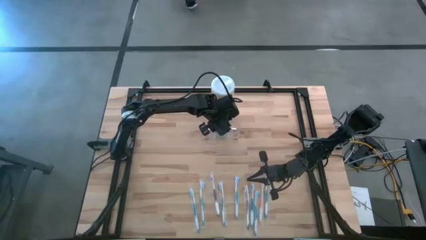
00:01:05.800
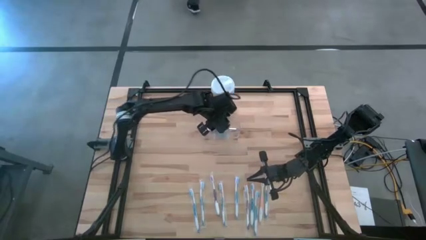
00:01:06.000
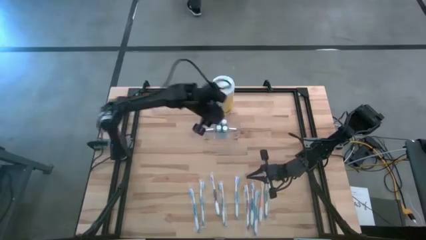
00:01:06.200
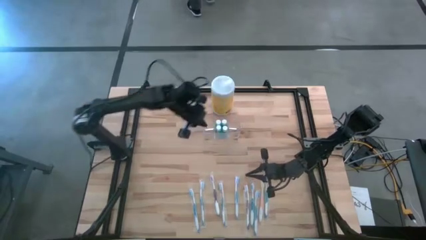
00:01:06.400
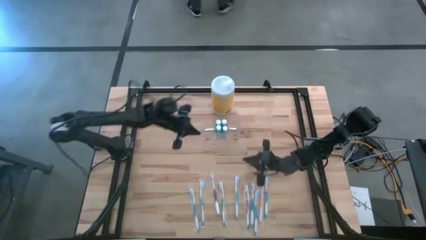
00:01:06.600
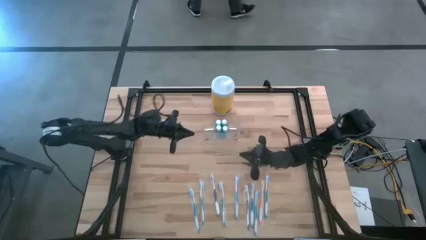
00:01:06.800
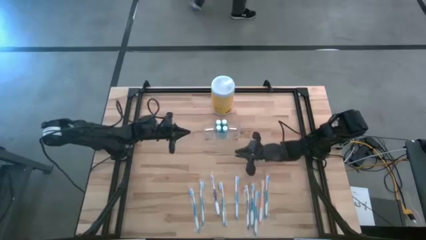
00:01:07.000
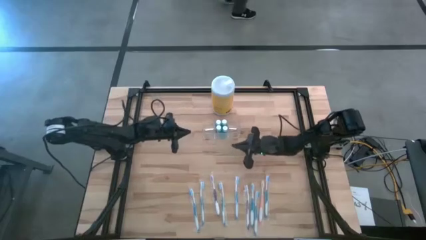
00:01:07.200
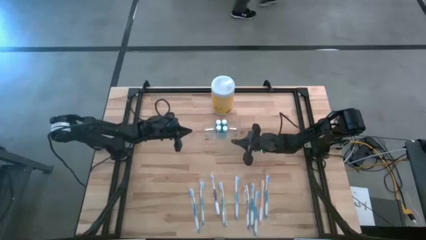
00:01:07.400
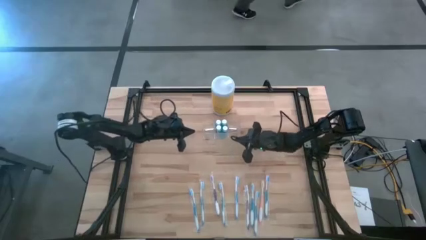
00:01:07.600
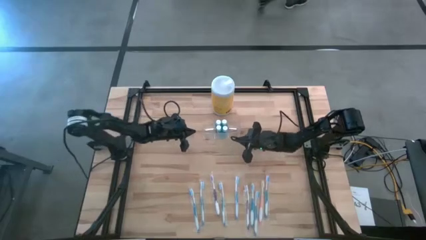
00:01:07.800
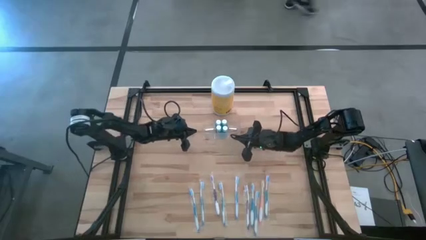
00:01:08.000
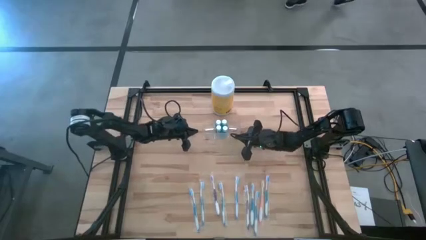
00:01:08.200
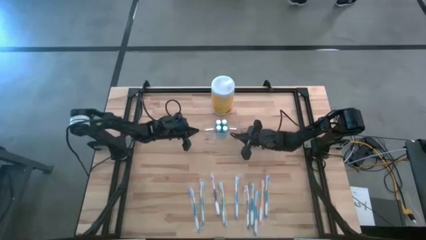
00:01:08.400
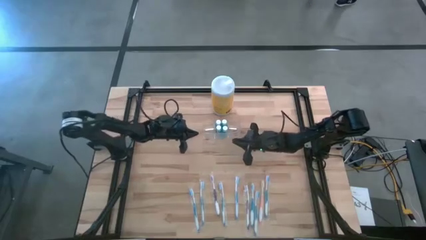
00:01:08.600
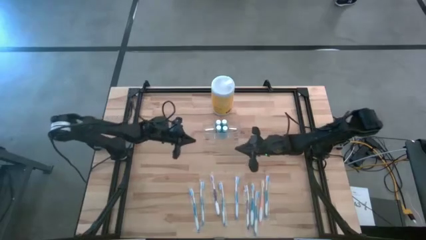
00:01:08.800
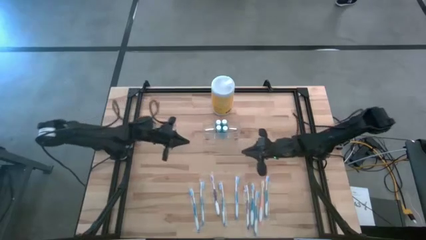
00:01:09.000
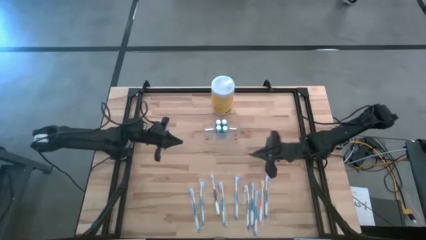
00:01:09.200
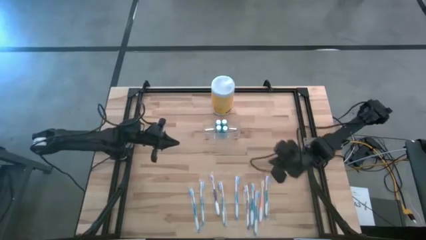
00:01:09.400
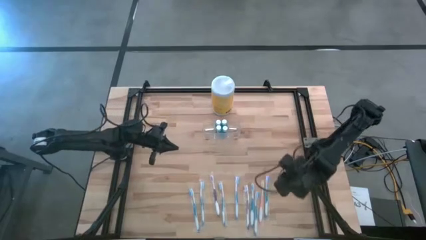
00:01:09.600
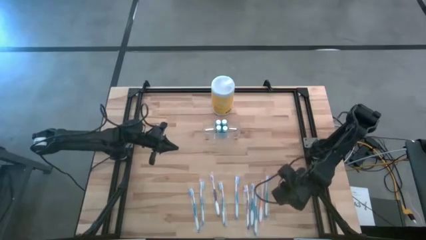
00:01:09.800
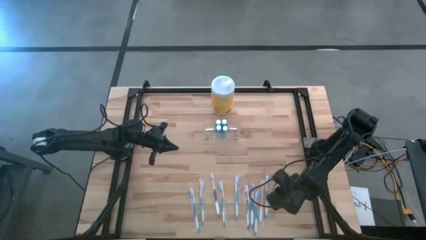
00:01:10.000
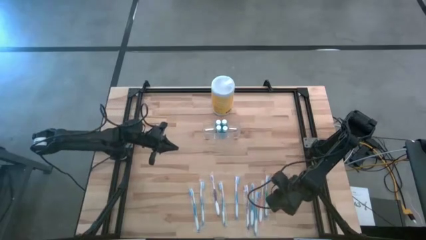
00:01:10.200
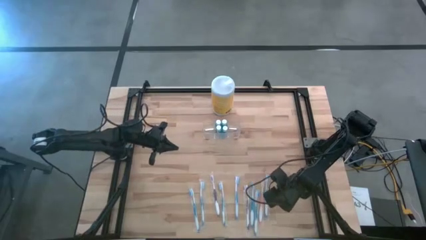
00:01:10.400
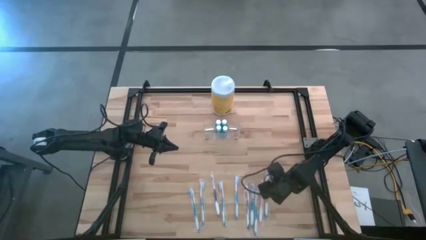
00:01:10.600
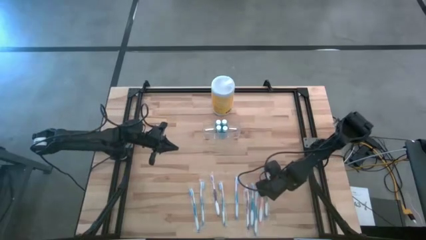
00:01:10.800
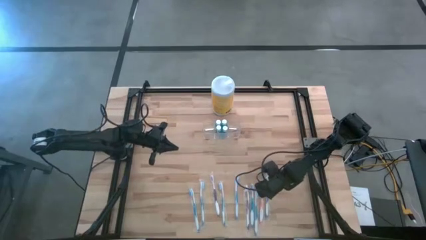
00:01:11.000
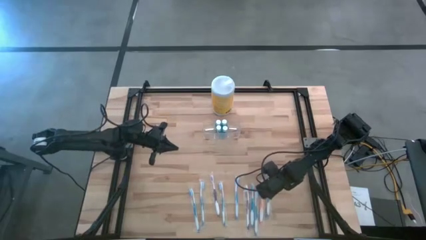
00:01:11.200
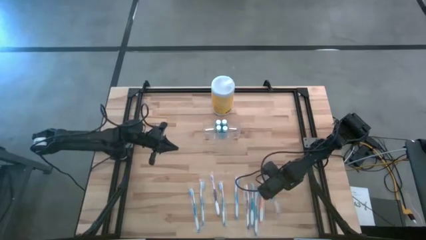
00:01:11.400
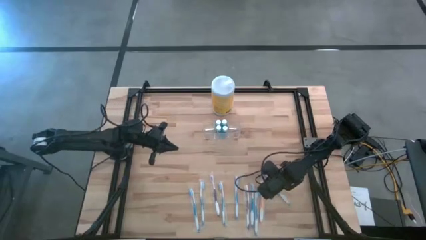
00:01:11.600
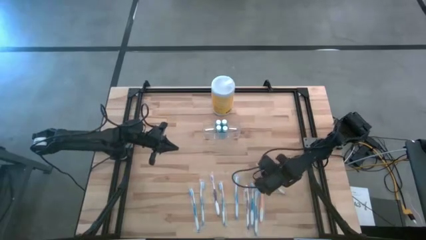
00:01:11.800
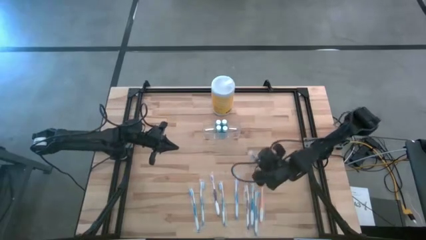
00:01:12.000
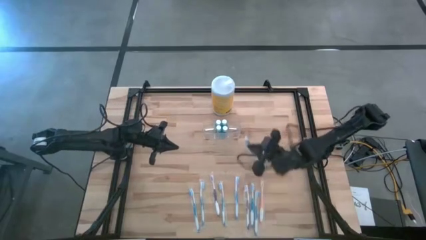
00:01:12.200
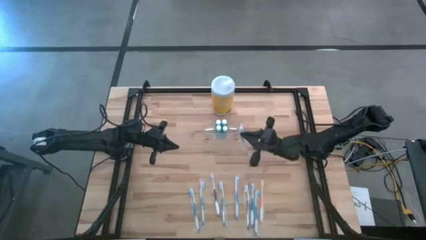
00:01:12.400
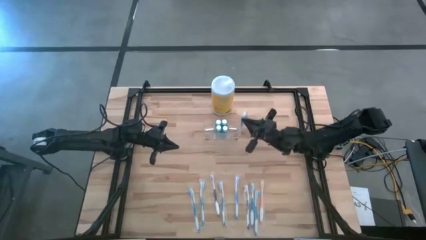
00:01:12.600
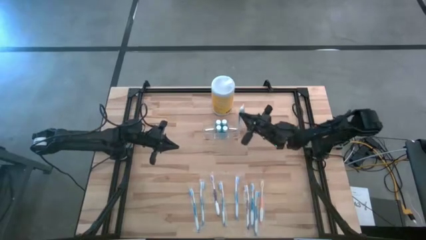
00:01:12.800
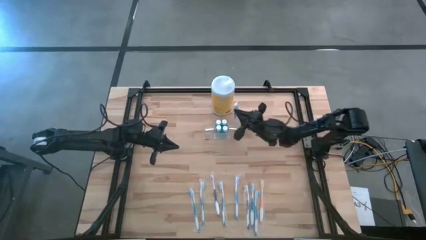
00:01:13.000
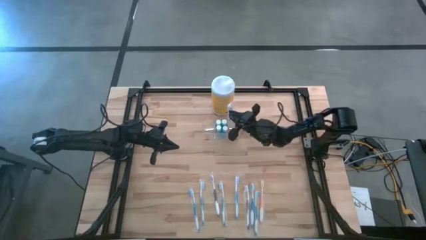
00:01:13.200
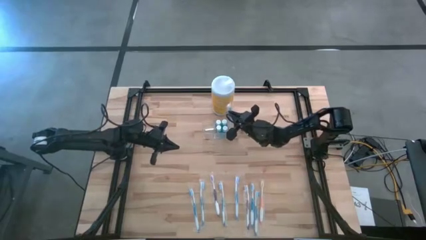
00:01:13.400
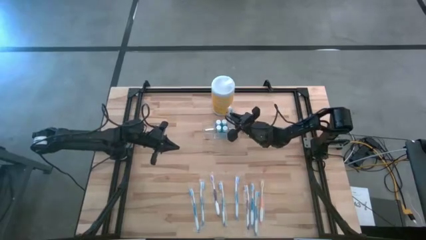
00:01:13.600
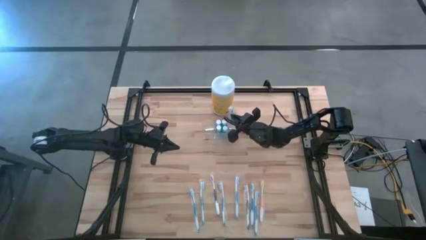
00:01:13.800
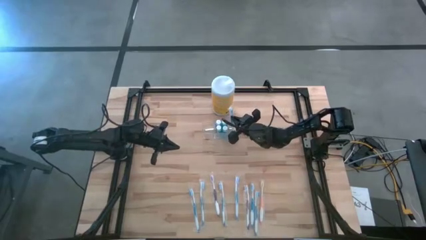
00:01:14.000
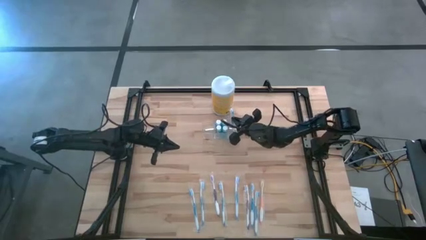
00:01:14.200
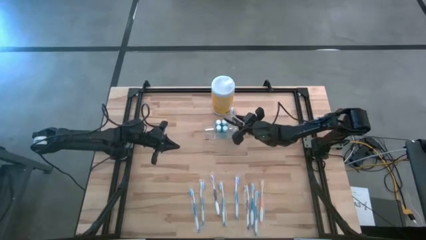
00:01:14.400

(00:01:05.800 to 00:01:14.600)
Task: Pick & Place toothbrushing station
Put the blue toothbrush into the transparent organizer

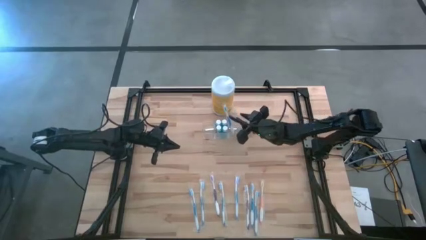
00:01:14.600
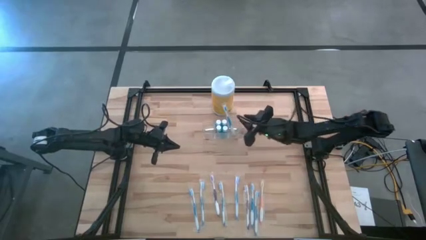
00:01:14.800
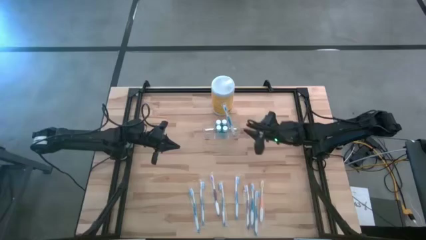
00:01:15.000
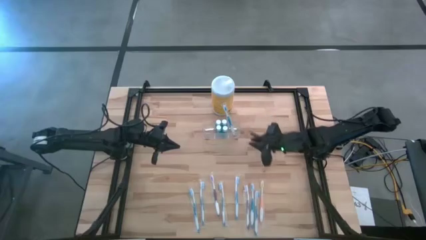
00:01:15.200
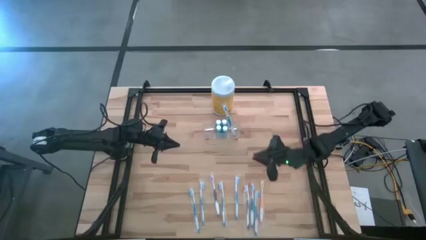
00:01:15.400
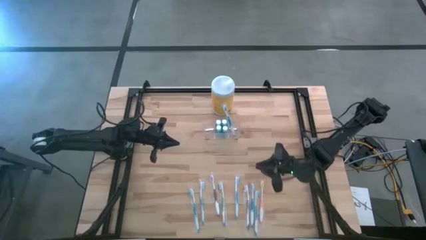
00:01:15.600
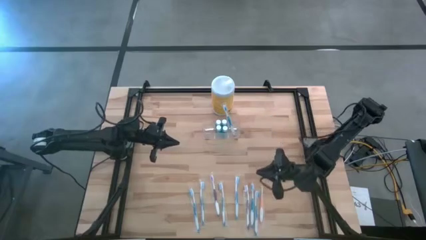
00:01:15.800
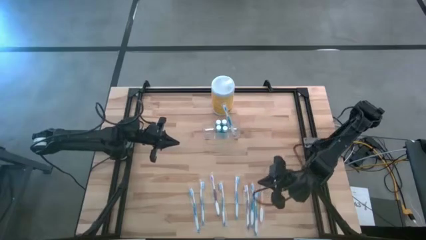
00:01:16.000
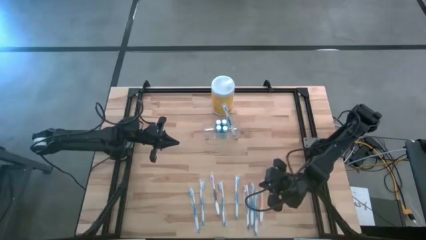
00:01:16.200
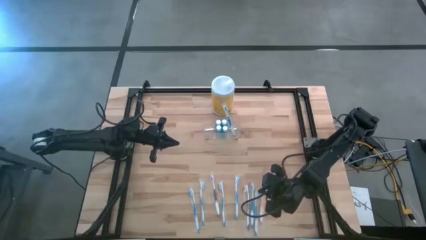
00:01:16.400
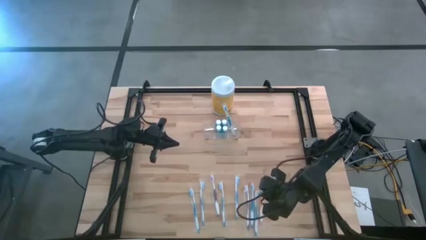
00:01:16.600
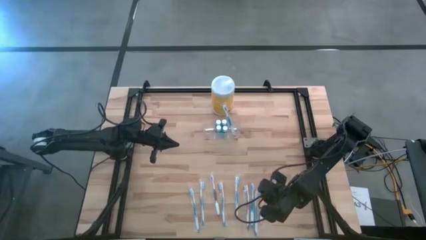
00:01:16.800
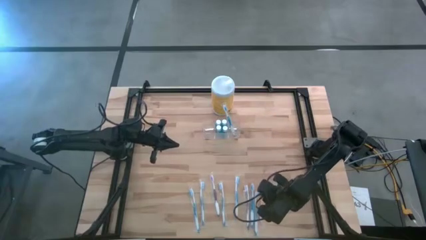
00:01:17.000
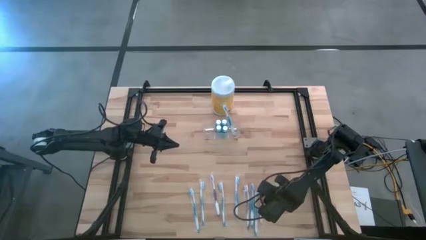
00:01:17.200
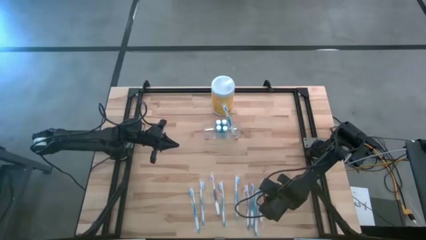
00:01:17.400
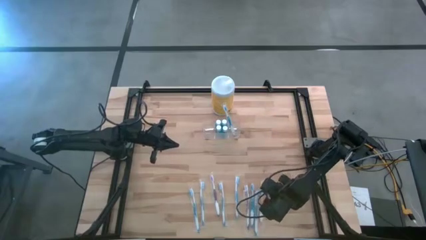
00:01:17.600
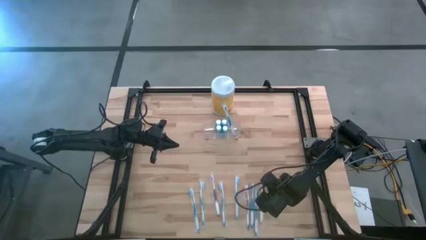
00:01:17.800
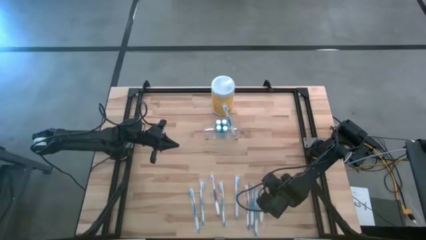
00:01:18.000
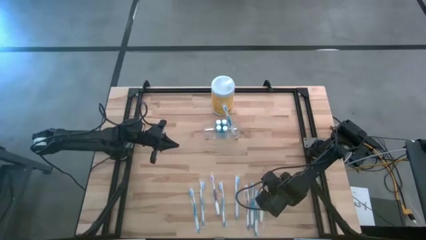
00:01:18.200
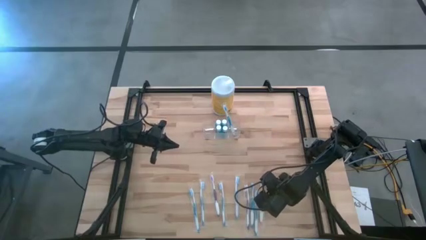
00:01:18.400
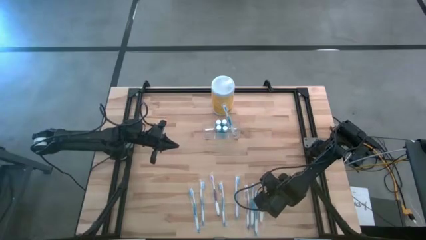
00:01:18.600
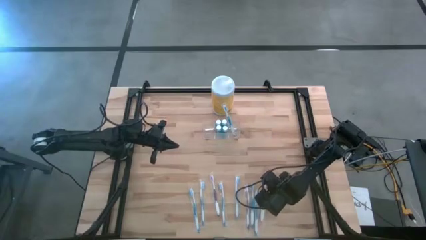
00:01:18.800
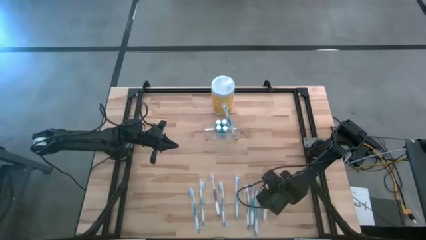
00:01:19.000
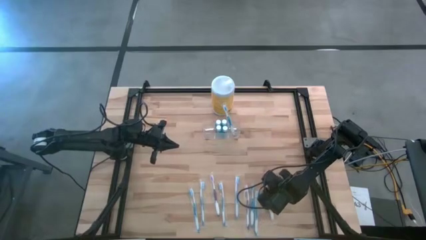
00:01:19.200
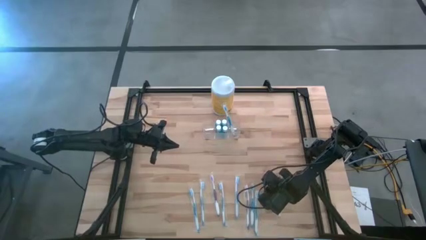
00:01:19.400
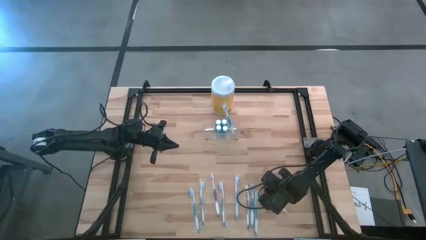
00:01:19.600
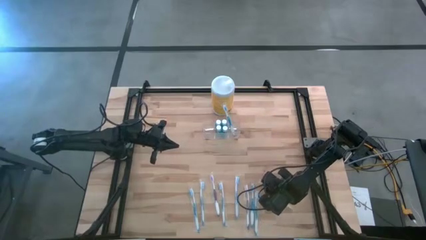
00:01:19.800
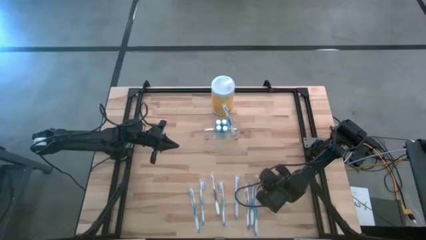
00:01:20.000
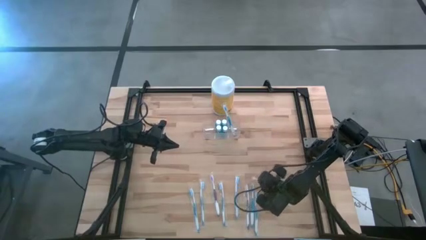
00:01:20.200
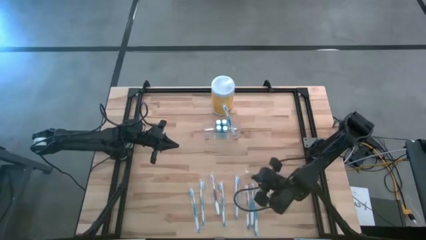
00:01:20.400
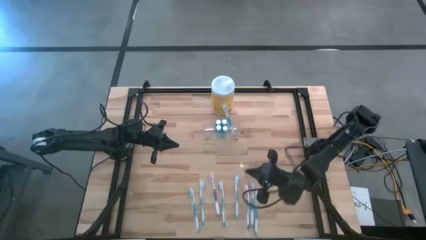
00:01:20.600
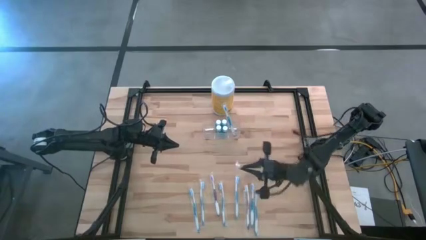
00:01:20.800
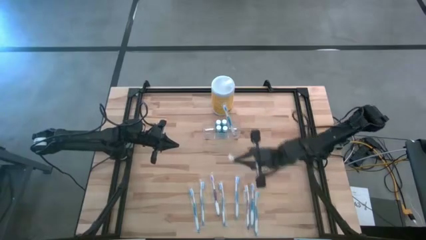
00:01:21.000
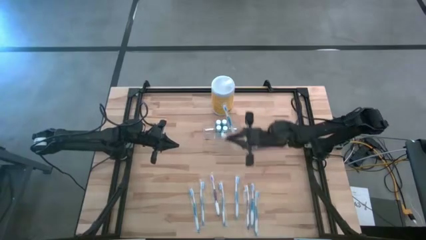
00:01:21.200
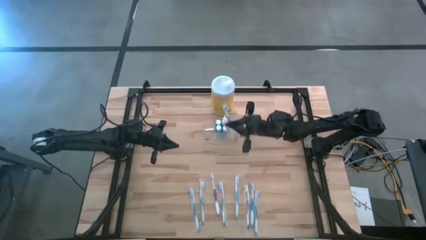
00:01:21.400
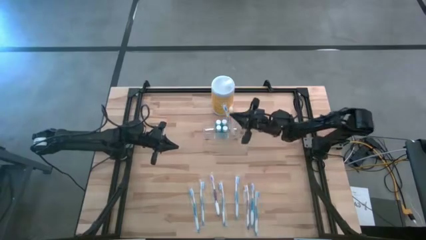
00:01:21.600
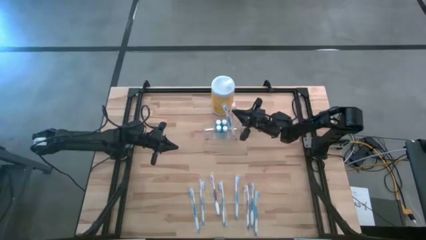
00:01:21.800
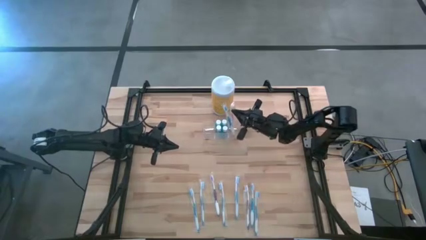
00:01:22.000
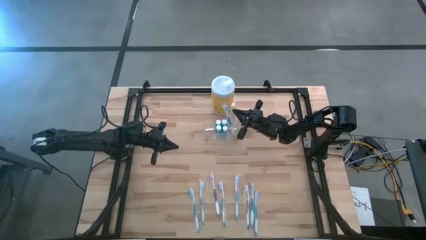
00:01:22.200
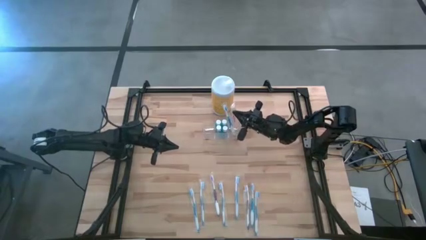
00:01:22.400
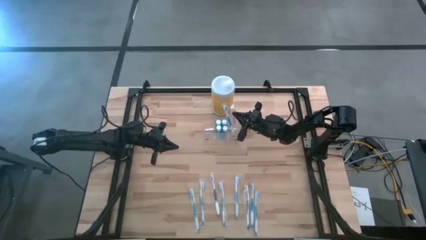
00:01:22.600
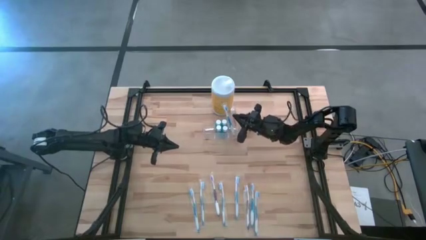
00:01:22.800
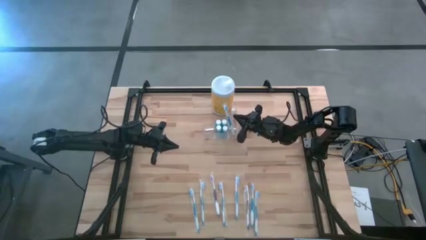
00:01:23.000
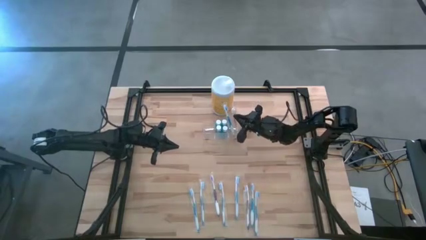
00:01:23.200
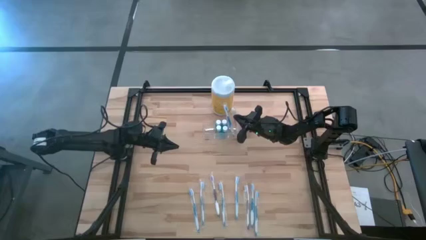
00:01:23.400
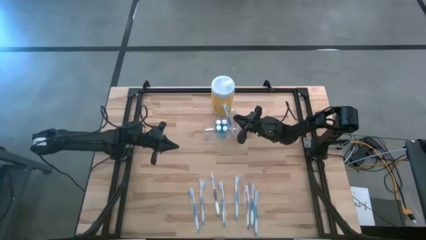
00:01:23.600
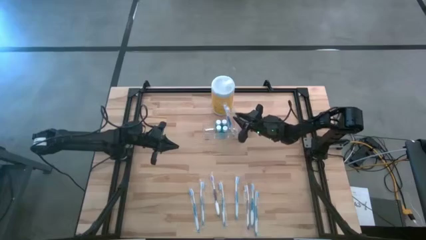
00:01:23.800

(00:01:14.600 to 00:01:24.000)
Put the orange toothbrush into the transparent organizer
